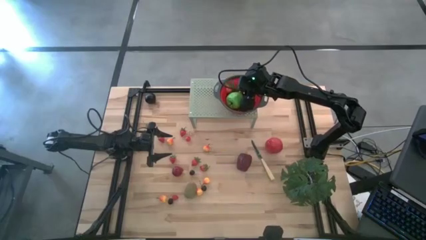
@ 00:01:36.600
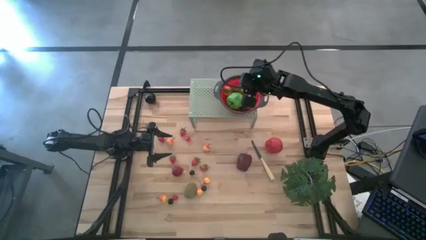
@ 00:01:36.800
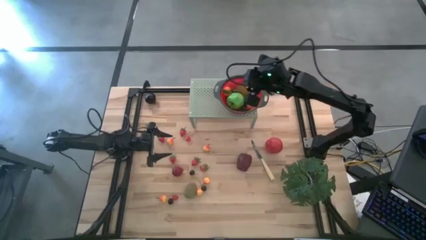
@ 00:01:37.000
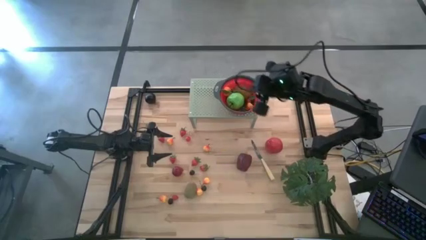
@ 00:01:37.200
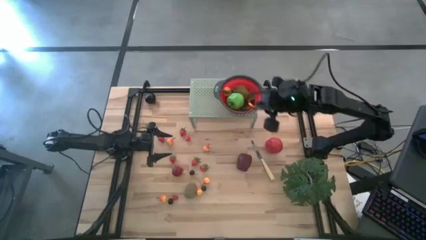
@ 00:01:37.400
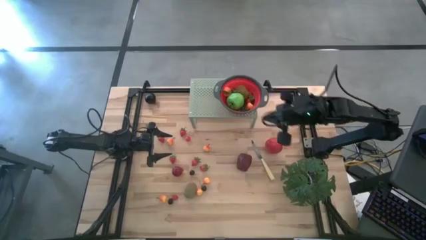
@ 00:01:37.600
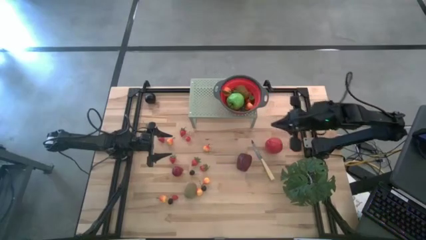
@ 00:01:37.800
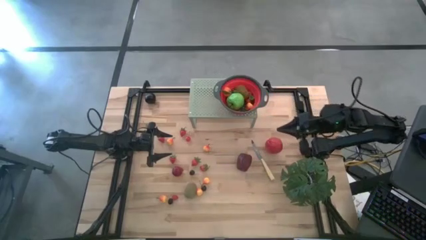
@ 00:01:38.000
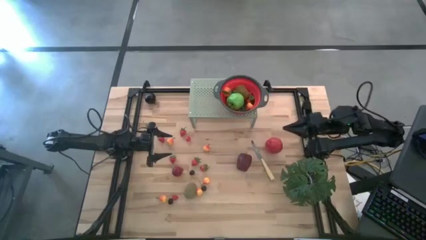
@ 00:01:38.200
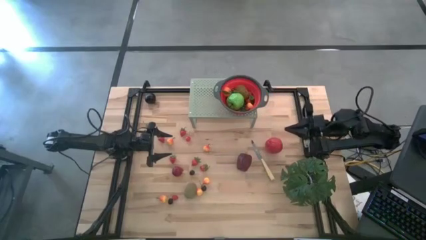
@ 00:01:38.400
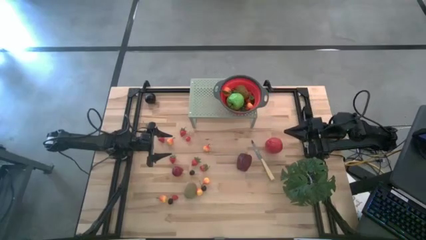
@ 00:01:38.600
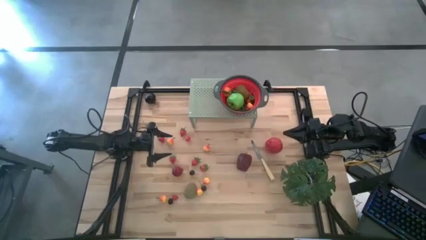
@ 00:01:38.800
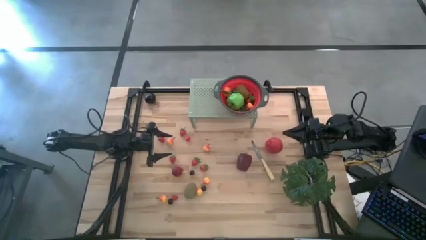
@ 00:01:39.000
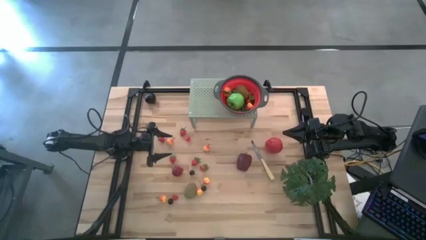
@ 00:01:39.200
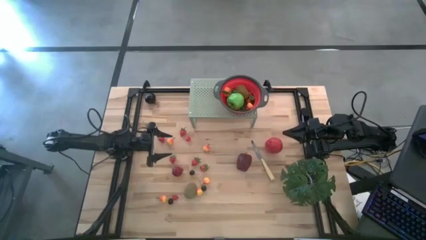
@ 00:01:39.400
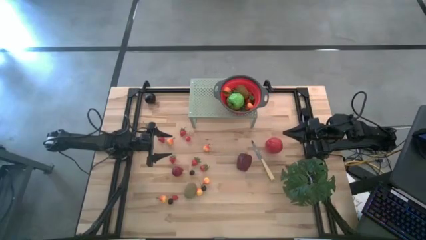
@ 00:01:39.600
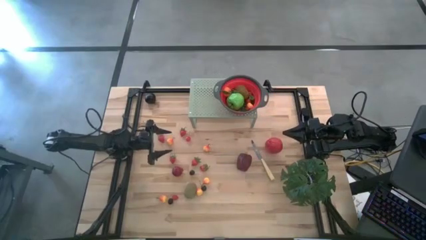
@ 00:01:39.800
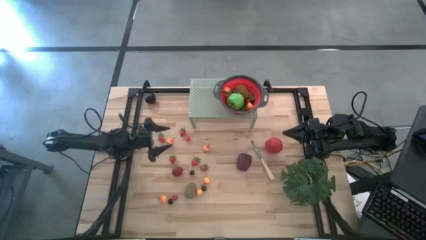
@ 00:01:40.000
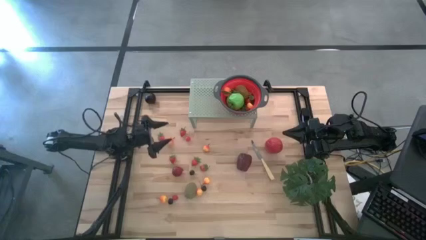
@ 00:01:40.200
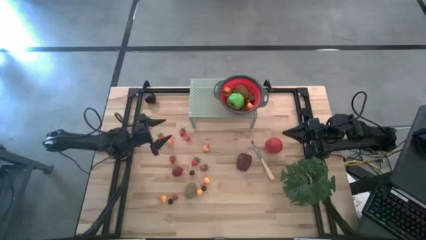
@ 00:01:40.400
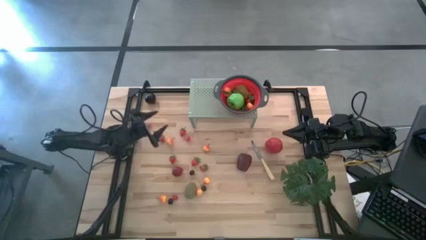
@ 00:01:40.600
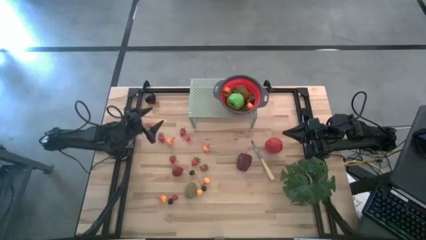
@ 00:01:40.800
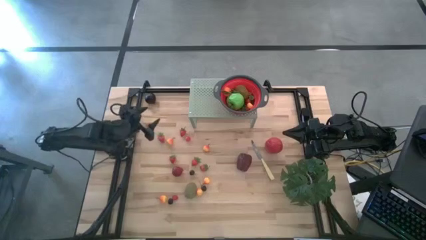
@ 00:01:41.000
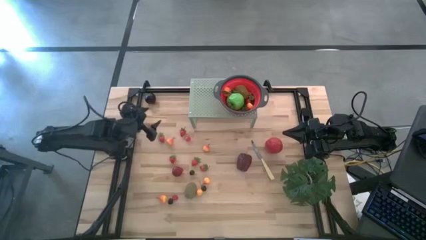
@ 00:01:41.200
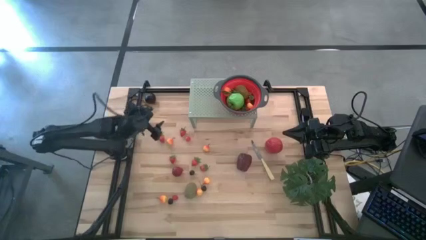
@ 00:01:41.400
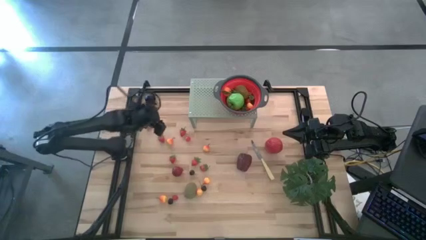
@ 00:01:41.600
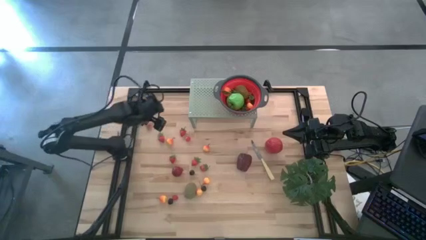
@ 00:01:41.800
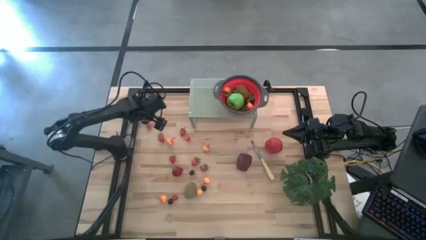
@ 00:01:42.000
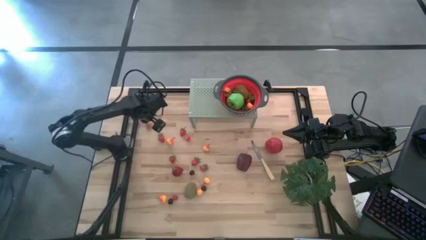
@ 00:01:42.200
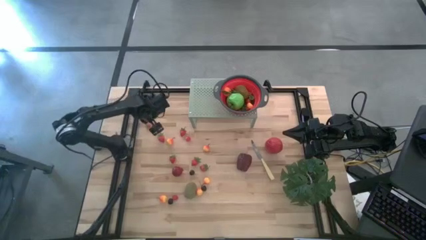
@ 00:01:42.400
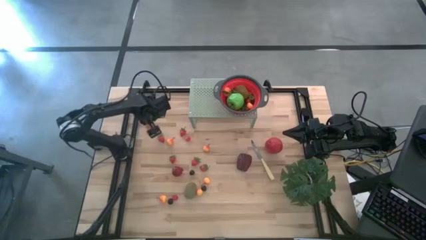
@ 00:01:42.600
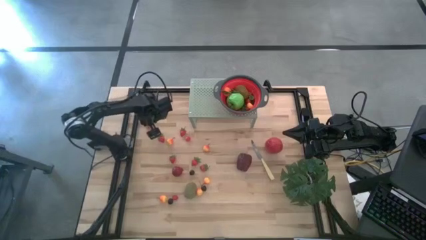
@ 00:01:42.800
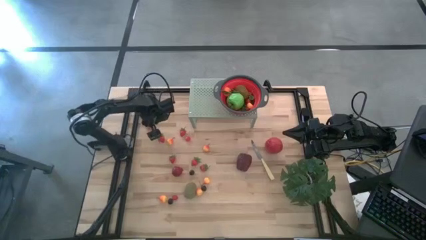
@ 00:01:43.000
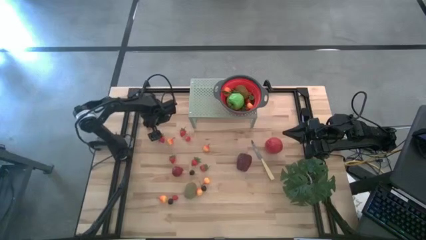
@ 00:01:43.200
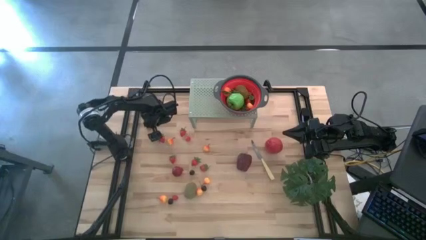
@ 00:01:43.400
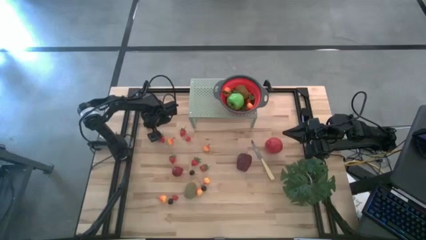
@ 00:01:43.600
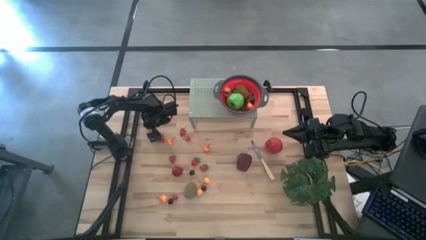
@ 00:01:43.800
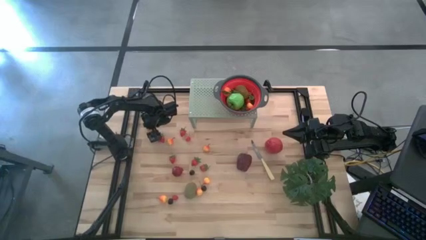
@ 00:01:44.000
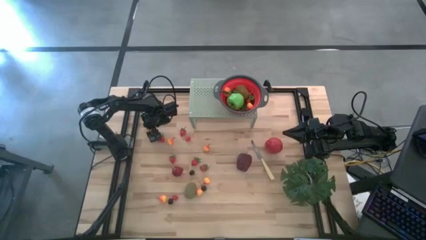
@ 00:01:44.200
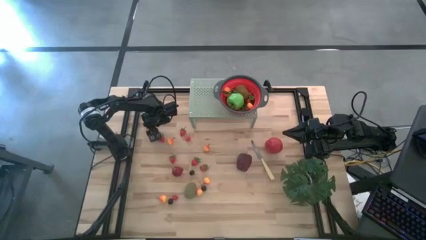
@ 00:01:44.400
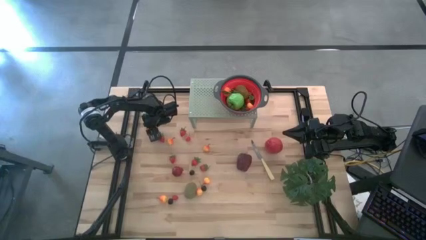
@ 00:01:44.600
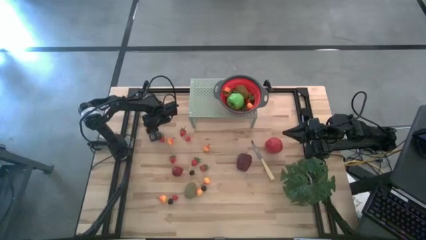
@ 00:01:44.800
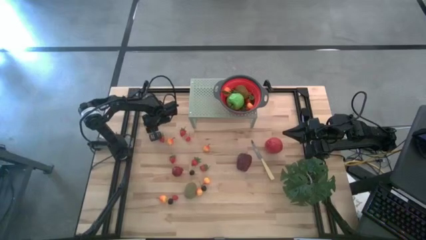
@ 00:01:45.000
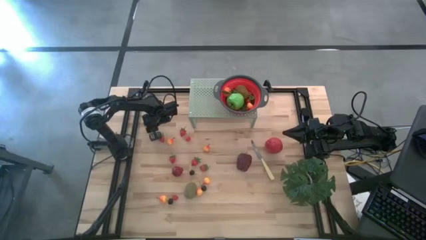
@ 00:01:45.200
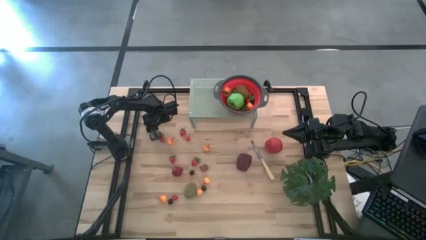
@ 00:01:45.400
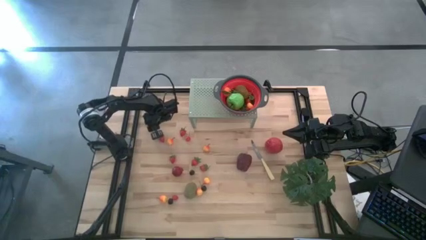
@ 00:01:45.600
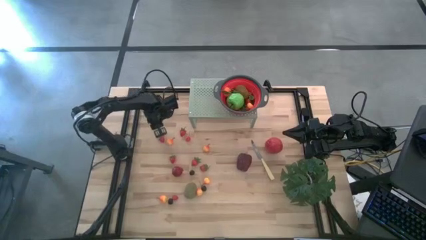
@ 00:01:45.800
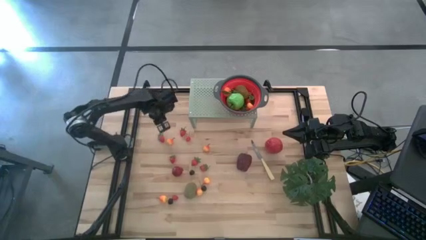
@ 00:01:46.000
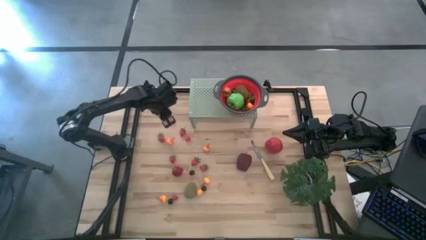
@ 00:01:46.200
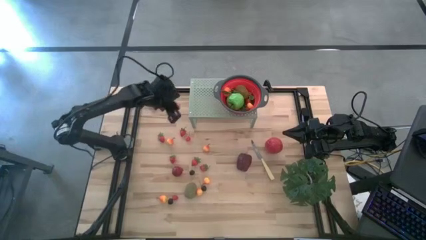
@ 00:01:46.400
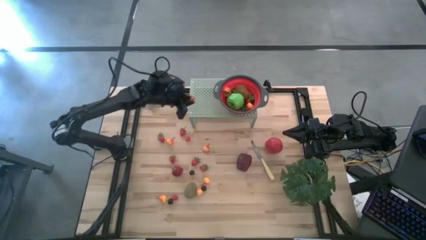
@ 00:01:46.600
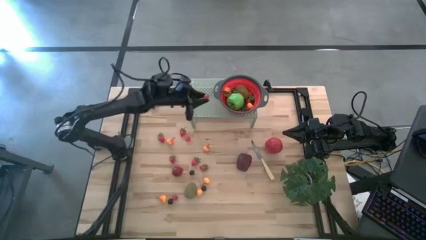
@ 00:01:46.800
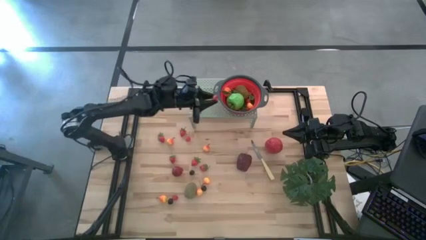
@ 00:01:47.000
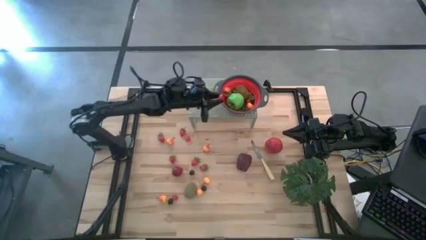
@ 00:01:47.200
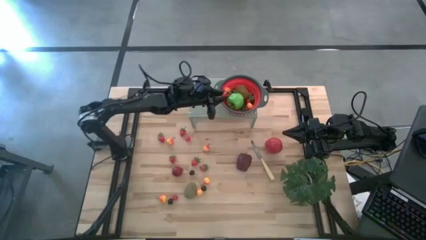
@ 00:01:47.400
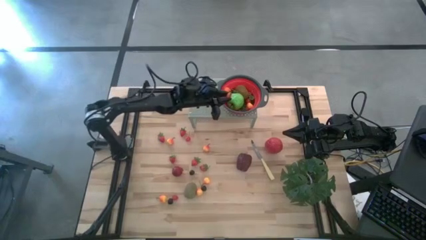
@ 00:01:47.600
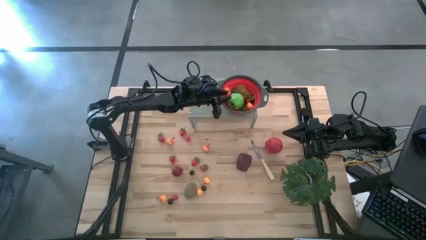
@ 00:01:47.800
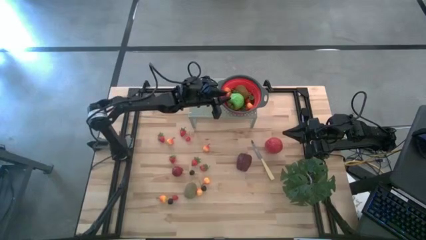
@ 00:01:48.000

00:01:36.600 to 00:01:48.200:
Task: Pick & Place Fruit
Put the red strawberry into the black strainer bowl on the shelf

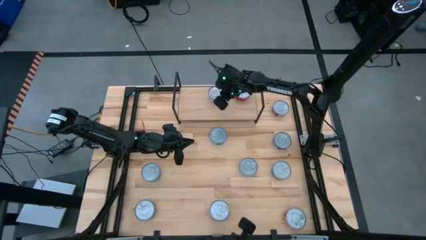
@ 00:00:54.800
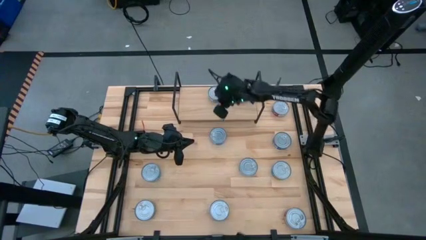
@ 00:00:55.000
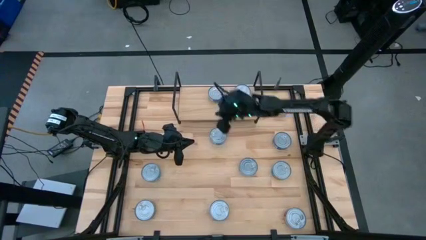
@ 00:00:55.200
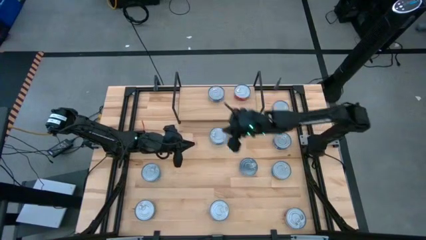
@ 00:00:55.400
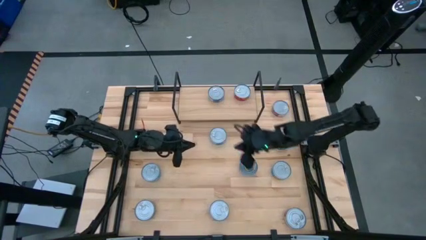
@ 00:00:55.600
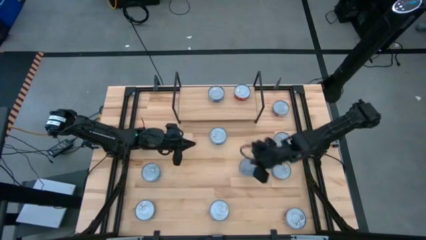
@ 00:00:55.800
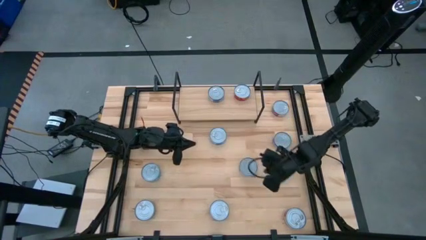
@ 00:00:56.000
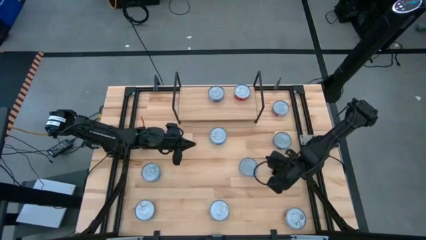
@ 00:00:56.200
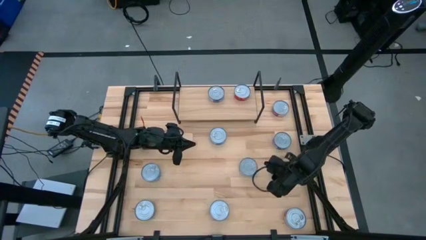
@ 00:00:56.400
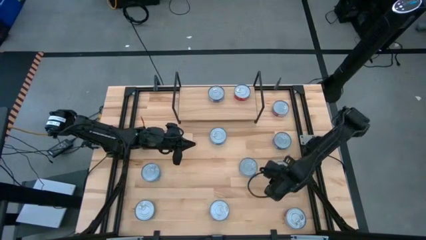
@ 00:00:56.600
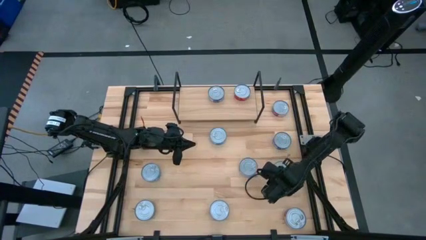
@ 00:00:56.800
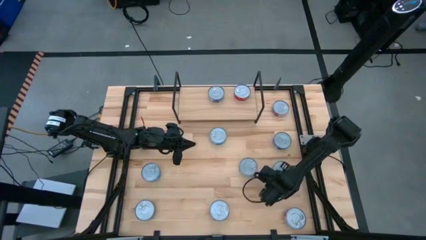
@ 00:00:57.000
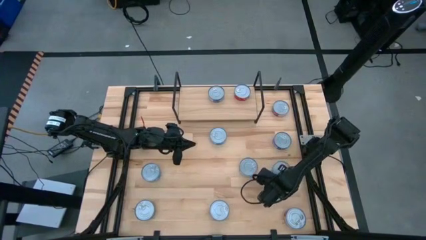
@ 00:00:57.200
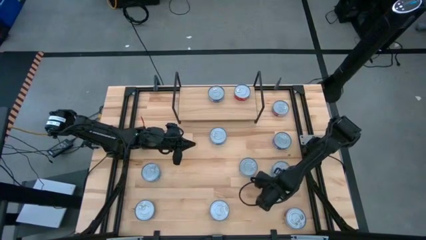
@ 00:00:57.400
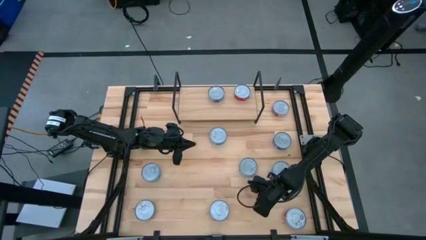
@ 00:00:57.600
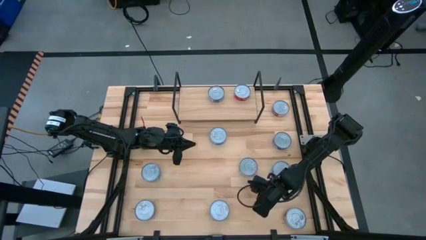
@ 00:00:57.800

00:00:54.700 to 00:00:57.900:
Task: Stack canned seafood by type on shelf
Move the middle right light blue tuna can to the center of the table
